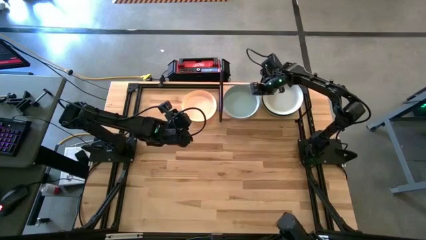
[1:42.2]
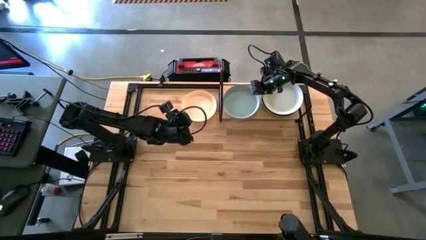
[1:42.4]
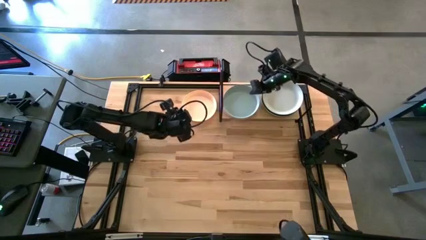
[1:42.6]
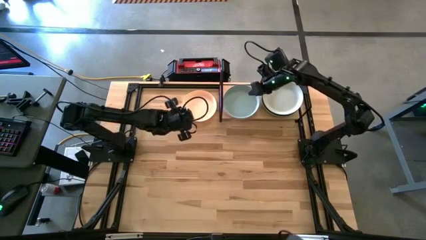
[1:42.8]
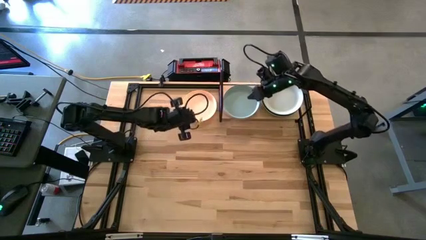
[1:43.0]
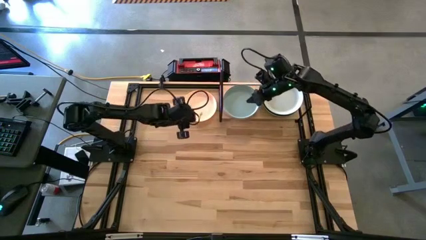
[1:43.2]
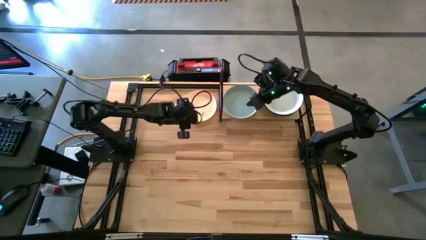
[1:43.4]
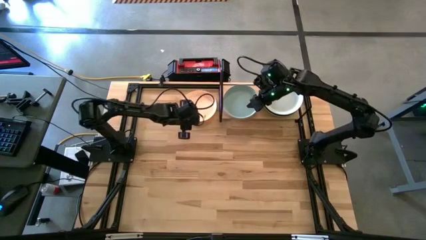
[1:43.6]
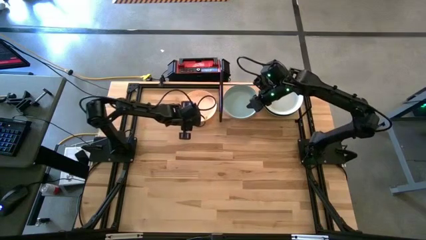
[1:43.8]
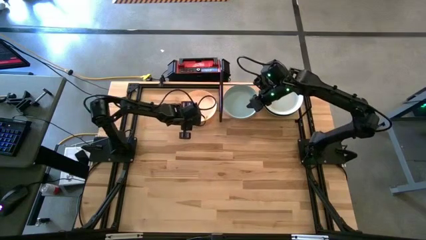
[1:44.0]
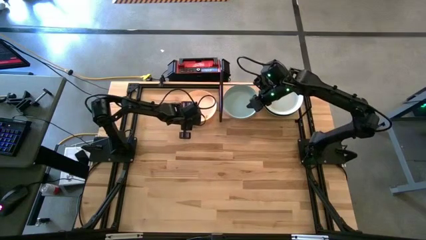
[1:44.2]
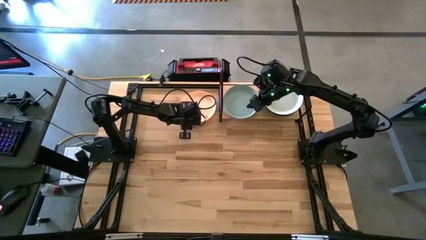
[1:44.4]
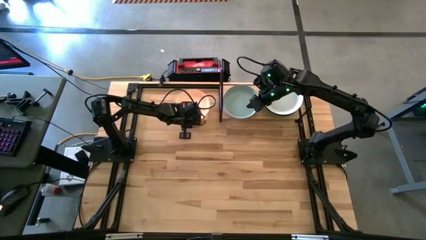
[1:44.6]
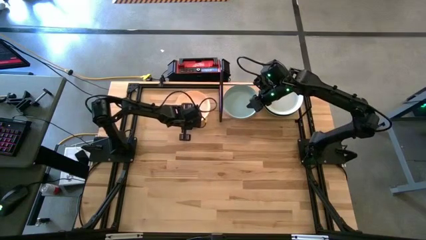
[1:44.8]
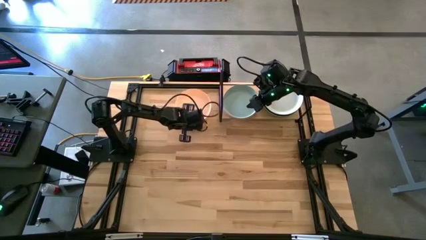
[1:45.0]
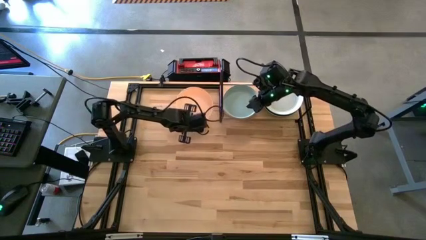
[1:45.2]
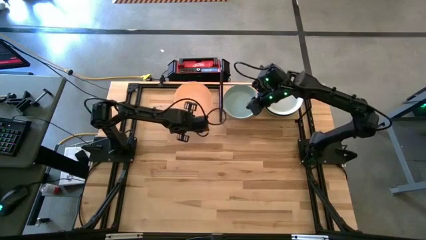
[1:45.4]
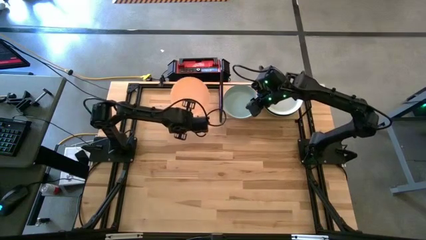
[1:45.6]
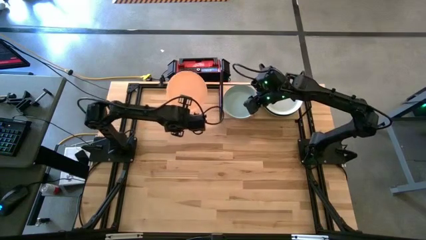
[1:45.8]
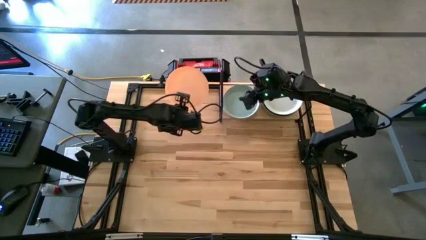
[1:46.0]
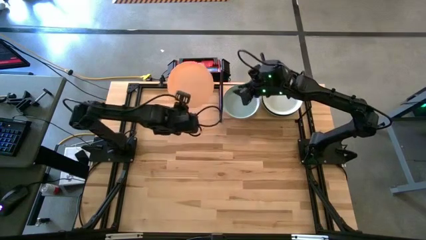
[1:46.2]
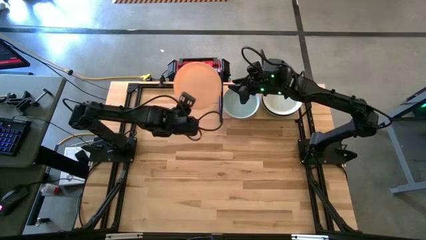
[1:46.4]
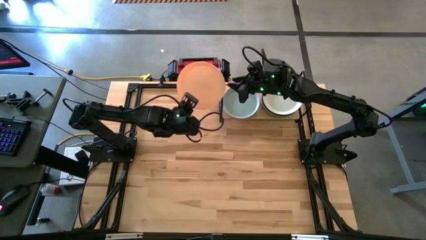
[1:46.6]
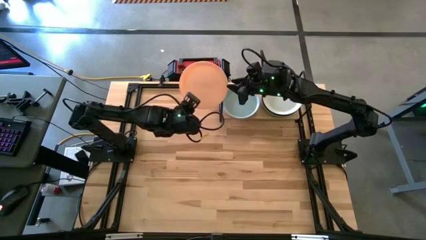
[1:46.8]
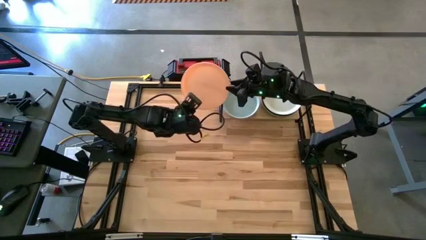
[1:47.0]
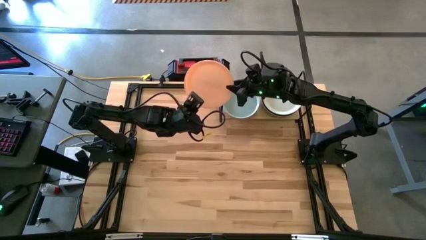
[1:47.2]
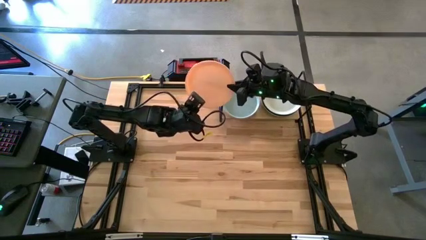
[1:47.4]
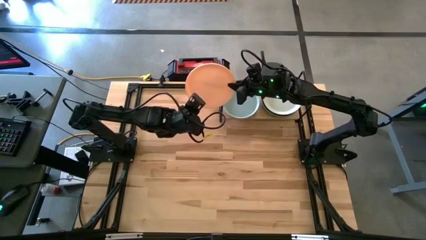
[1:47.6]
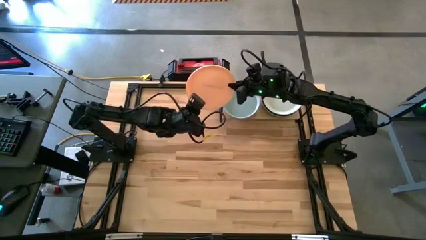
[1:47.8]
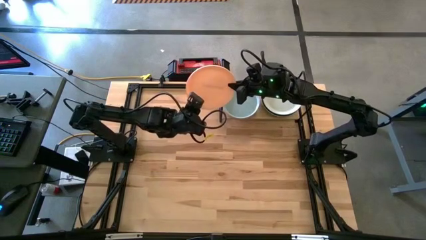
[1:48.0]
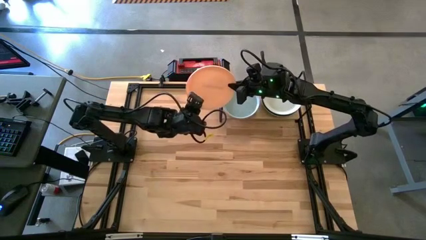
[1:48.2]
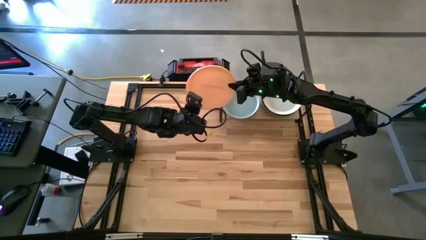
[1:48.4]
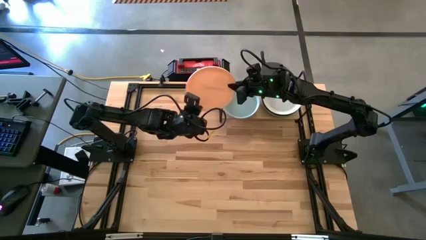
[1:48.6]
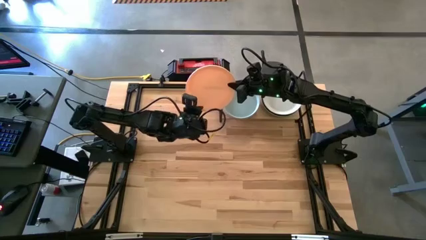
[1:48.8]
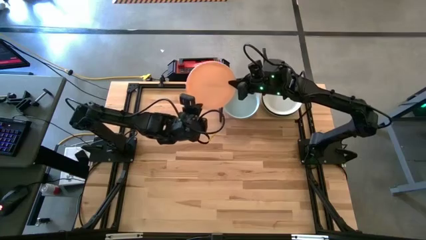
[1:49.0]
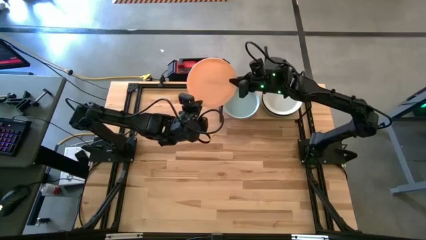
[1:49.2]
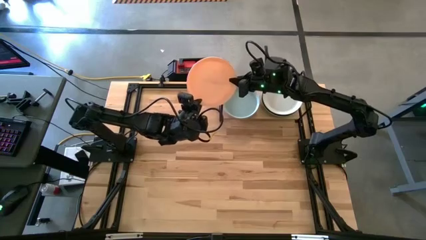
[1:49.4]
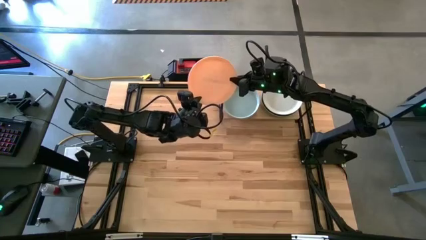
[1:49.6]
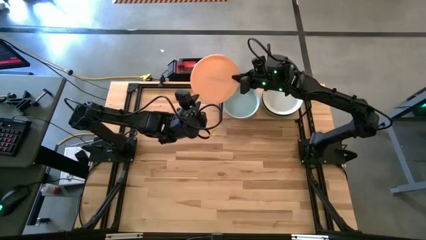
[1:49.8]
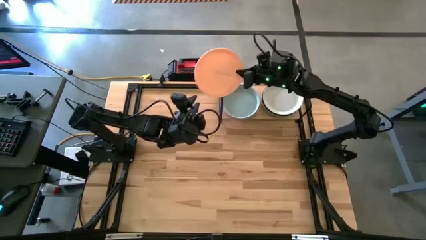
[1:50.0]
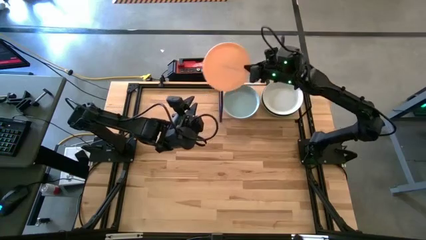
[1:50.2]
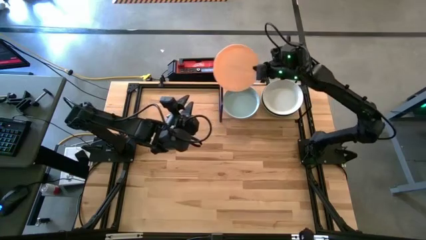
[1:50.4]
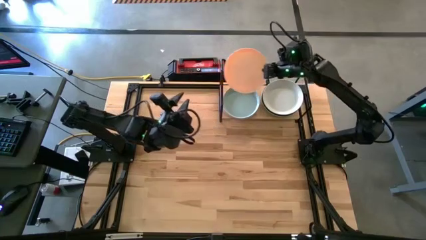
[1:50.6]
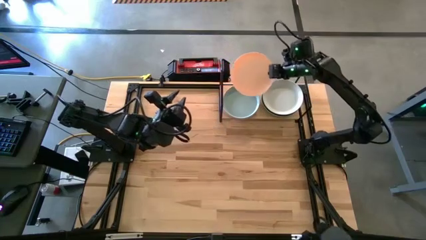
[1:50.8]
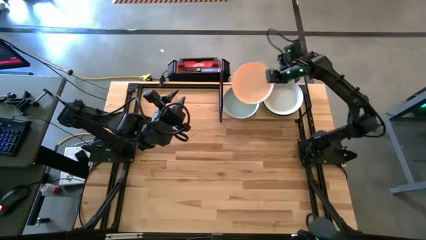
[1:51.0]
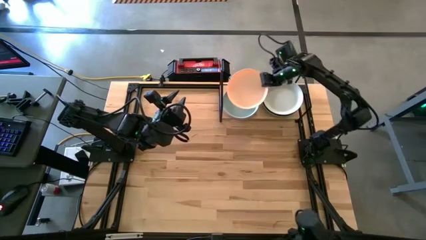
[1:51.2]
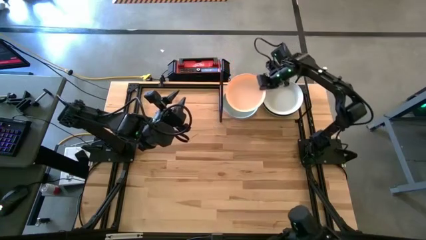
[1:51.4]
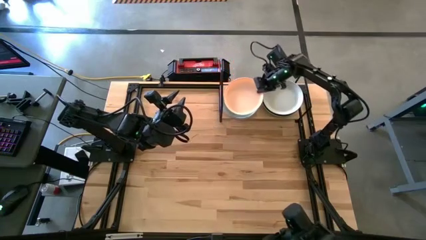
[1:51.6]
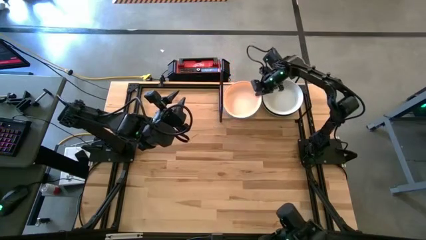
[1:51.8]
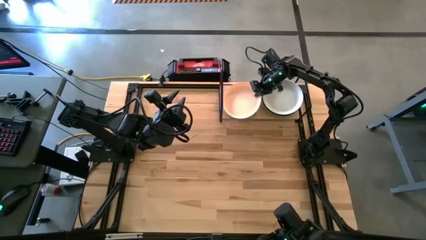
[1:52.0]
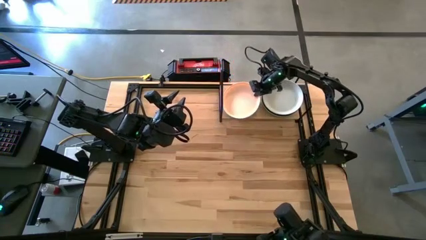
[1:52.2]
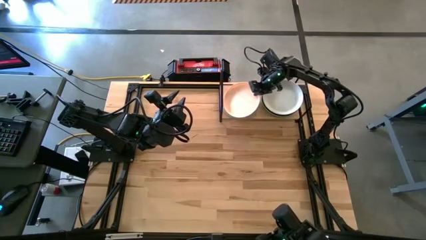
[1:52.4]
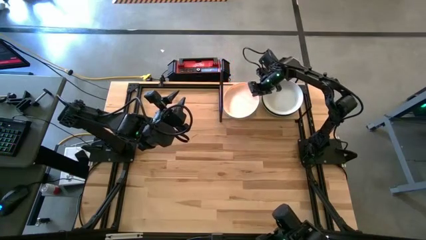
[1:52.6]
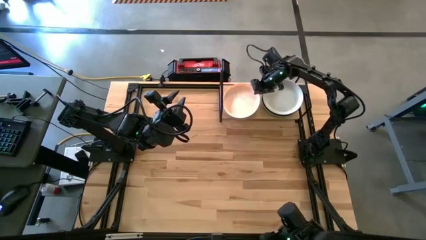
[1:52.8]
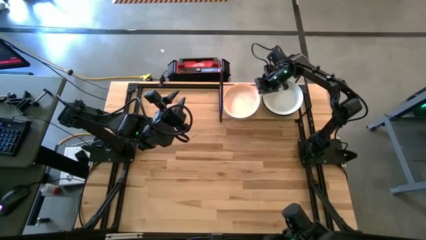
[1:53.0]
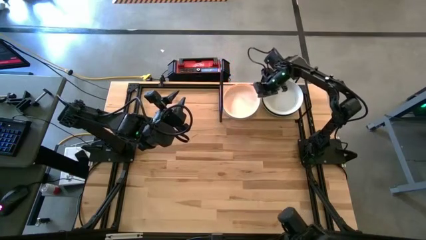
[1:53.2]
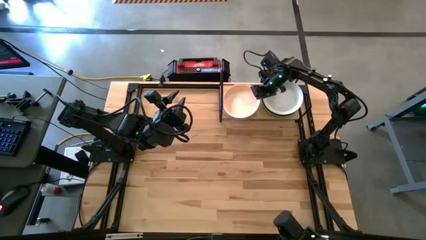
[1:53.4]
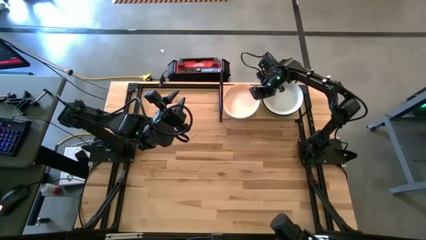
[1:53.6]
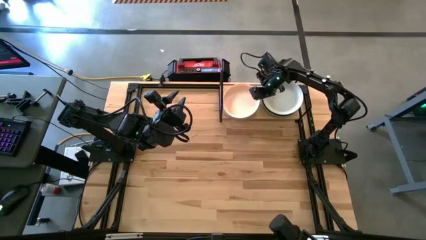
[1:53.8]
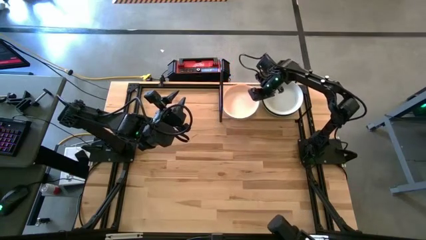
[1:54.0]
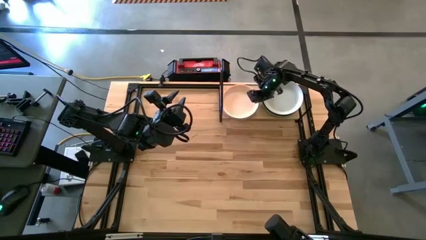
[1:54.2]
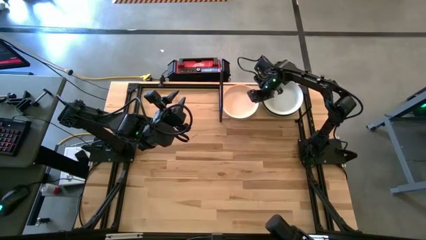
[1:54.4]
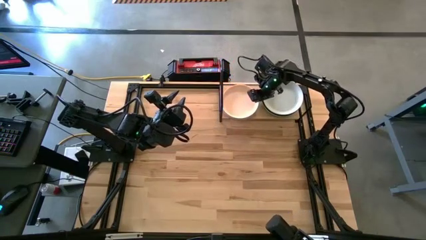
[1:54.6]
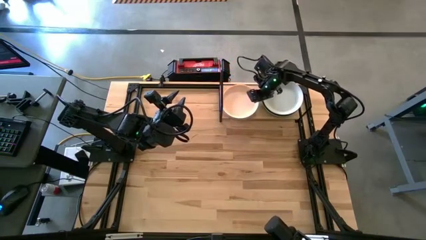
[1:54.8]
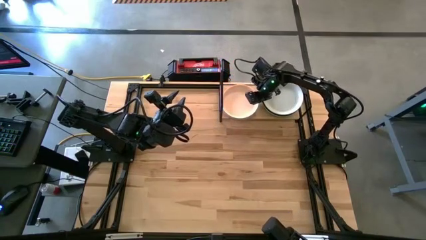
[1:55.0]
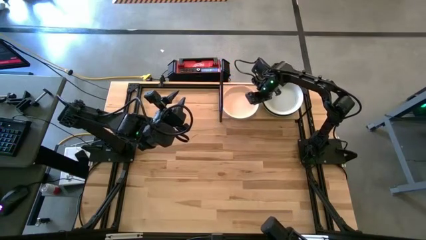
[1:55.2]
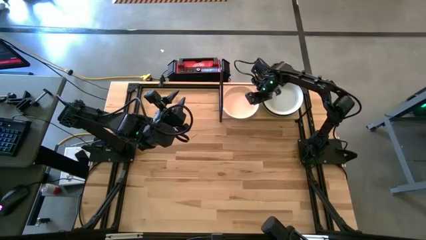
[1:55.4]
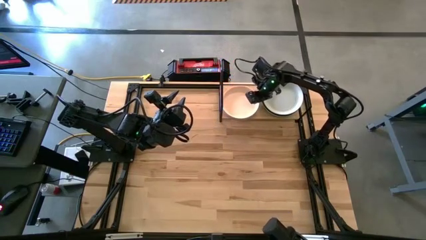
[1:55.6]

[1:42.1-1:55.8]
Task: Place and stack plates onto a shelf
Stack the light orange plate on top of the light blue plate
